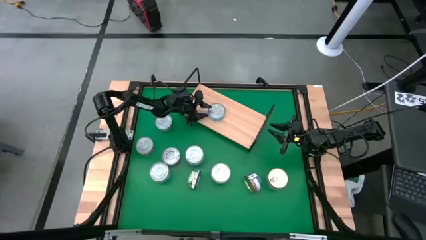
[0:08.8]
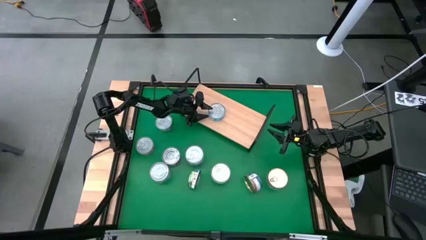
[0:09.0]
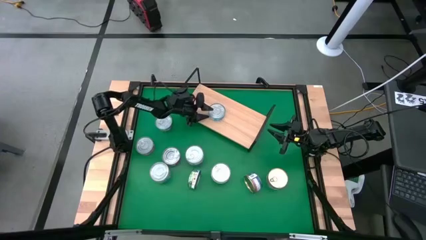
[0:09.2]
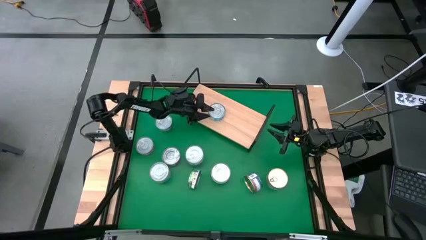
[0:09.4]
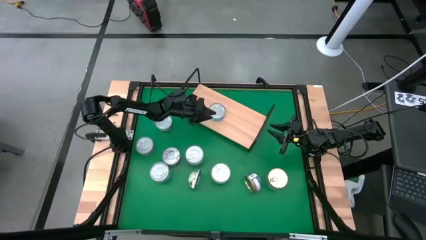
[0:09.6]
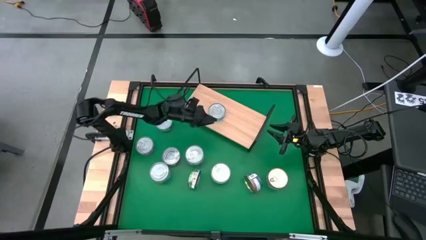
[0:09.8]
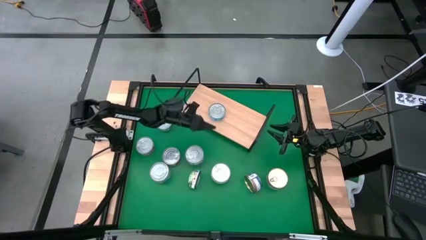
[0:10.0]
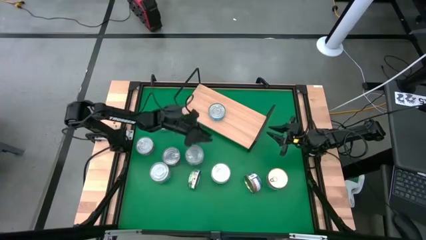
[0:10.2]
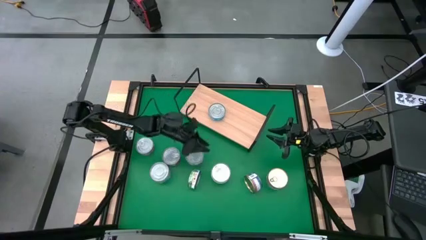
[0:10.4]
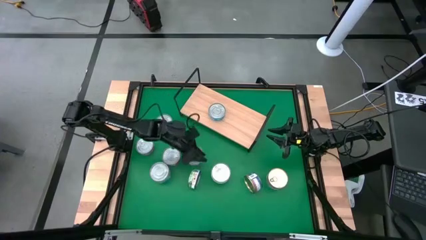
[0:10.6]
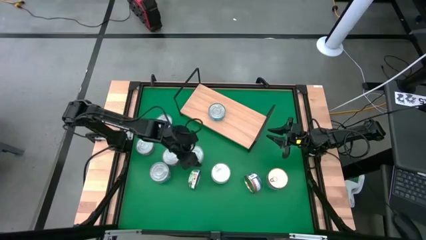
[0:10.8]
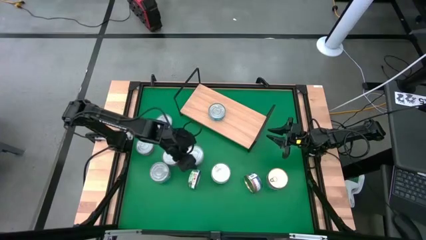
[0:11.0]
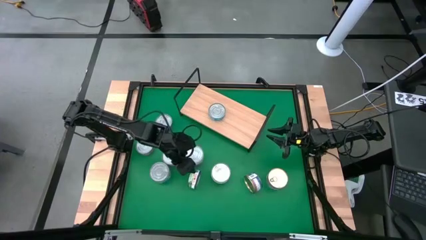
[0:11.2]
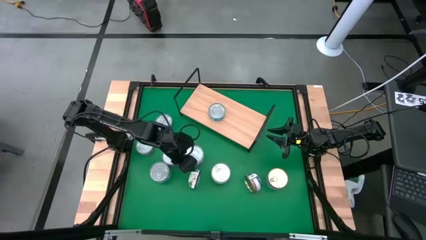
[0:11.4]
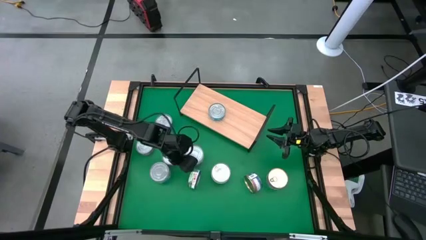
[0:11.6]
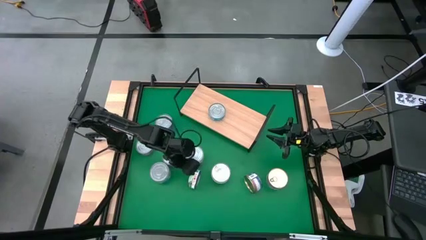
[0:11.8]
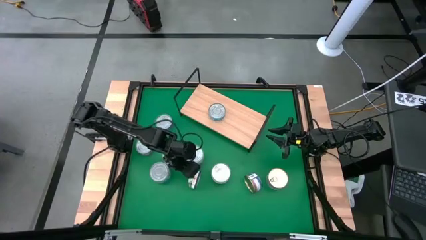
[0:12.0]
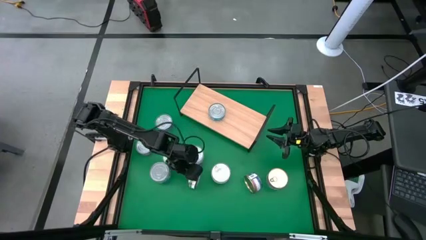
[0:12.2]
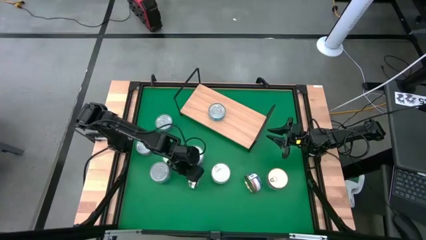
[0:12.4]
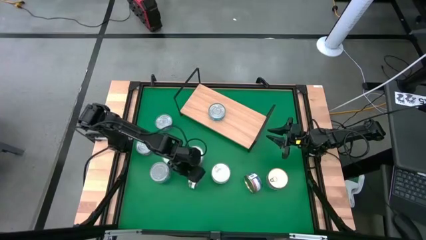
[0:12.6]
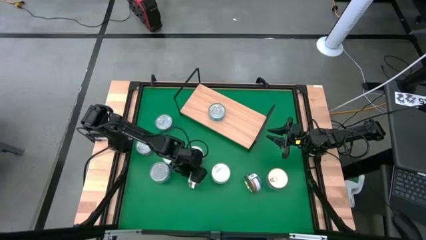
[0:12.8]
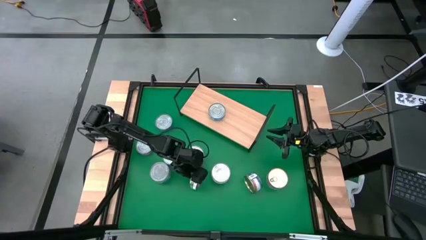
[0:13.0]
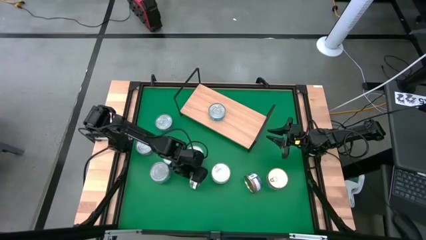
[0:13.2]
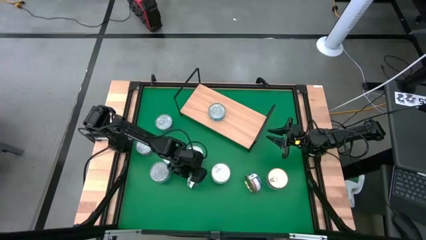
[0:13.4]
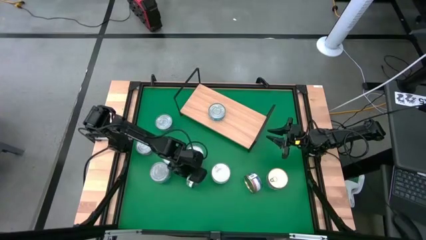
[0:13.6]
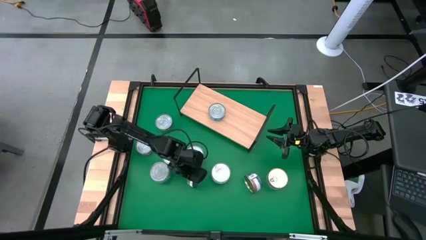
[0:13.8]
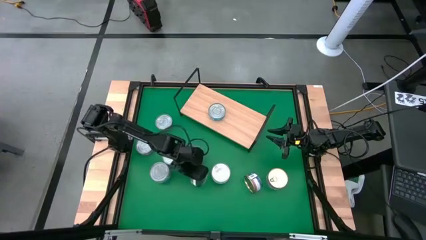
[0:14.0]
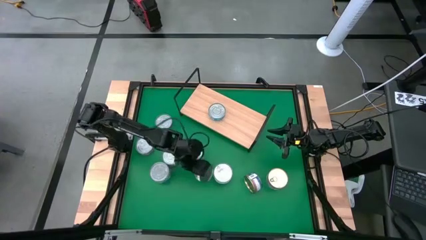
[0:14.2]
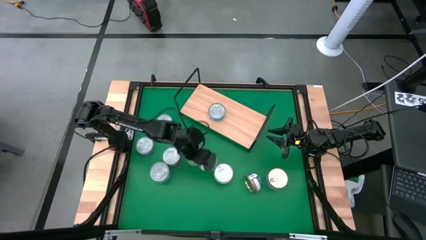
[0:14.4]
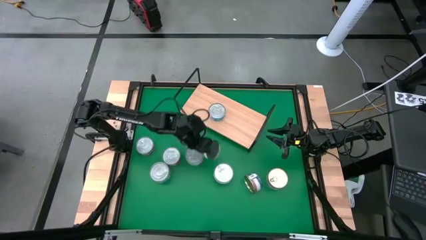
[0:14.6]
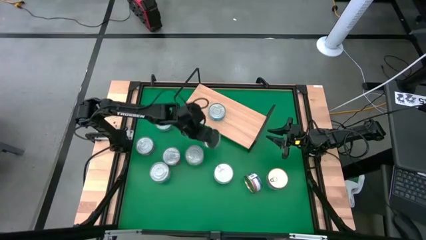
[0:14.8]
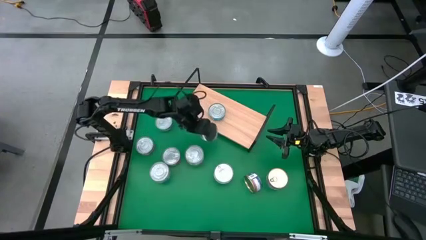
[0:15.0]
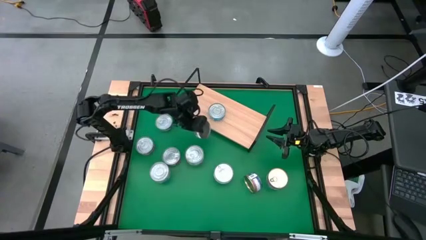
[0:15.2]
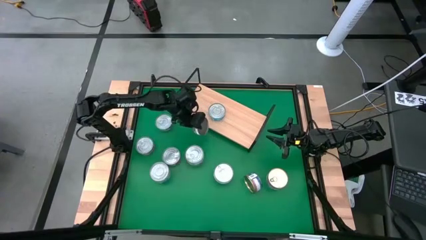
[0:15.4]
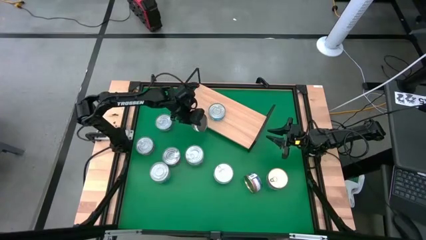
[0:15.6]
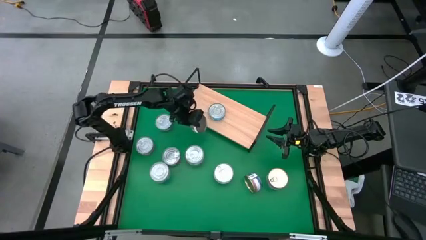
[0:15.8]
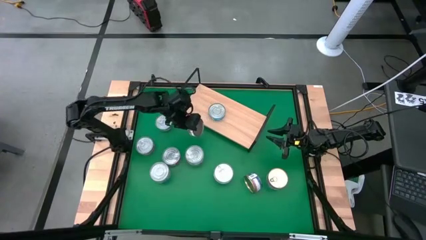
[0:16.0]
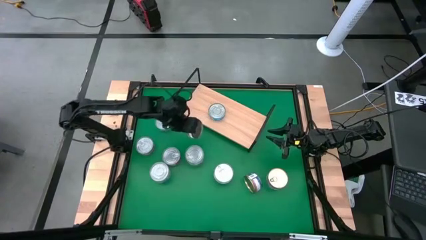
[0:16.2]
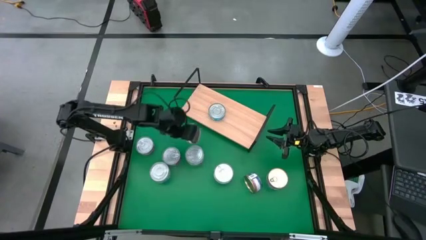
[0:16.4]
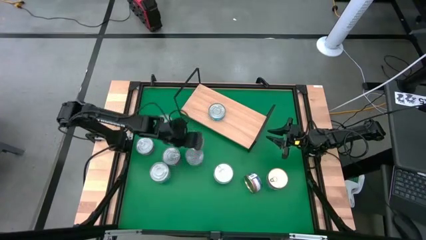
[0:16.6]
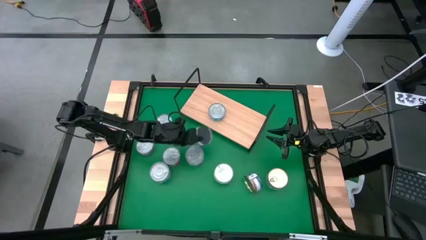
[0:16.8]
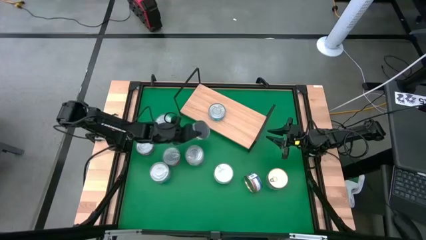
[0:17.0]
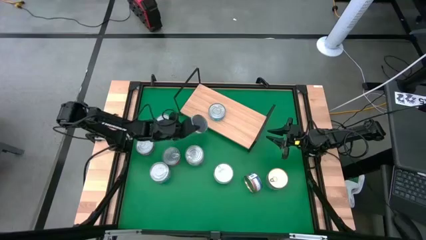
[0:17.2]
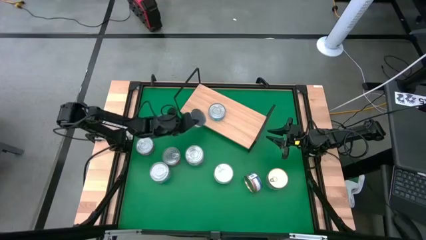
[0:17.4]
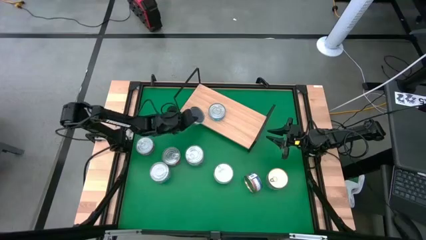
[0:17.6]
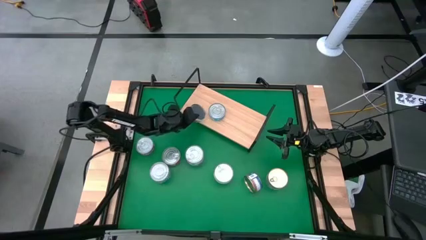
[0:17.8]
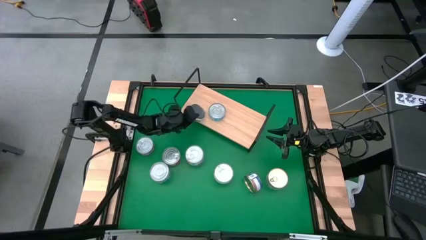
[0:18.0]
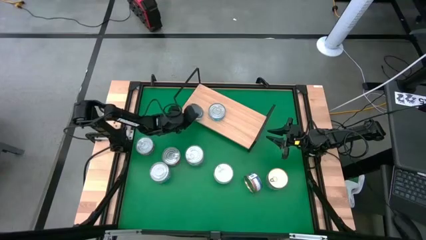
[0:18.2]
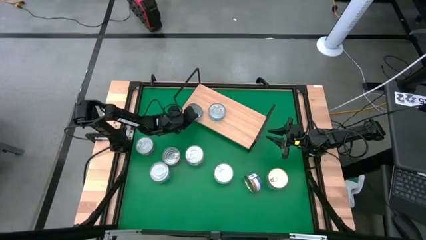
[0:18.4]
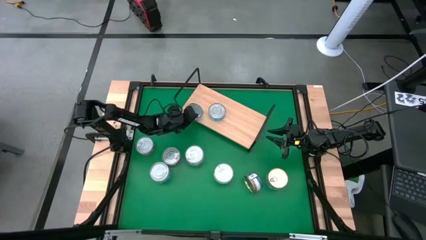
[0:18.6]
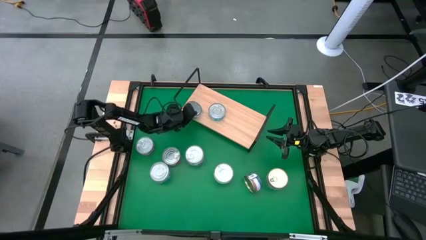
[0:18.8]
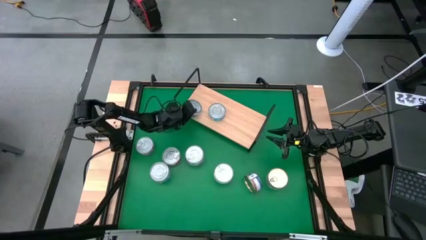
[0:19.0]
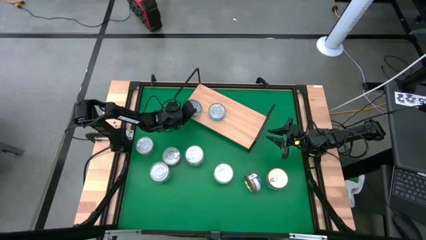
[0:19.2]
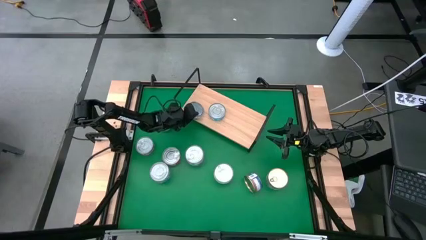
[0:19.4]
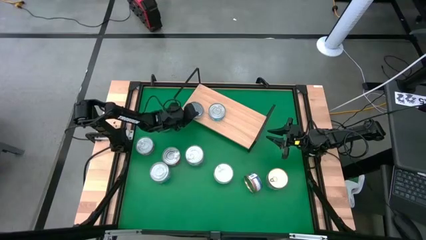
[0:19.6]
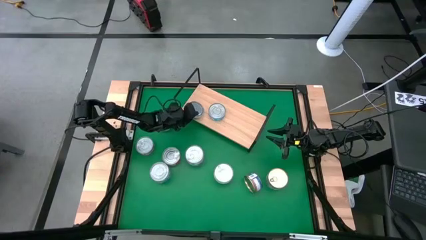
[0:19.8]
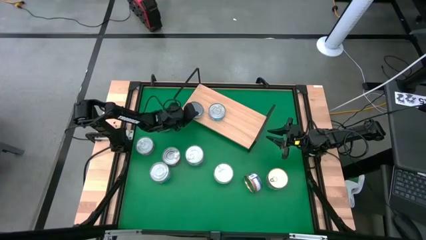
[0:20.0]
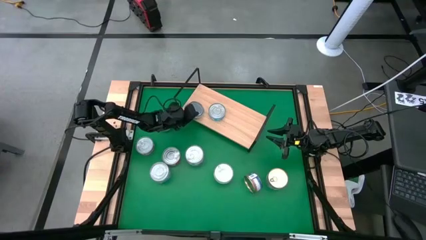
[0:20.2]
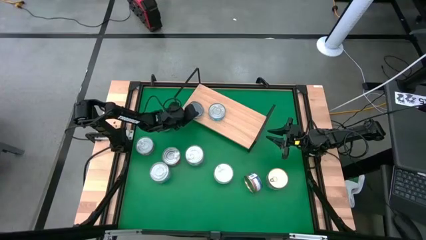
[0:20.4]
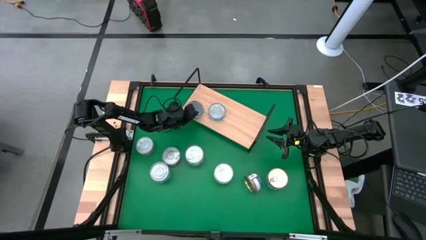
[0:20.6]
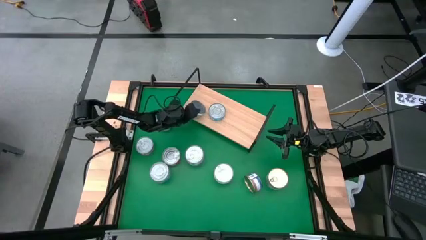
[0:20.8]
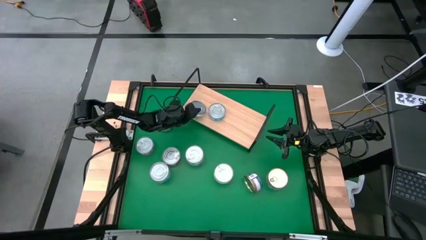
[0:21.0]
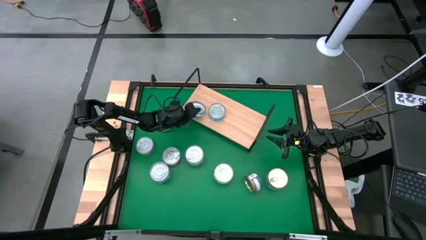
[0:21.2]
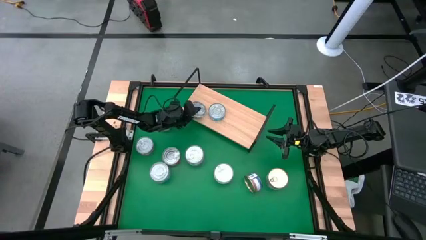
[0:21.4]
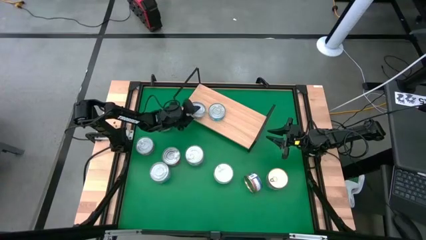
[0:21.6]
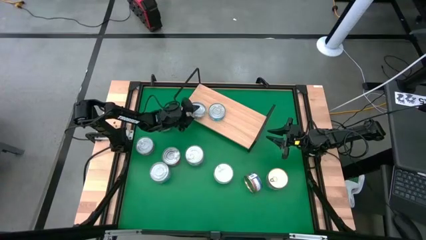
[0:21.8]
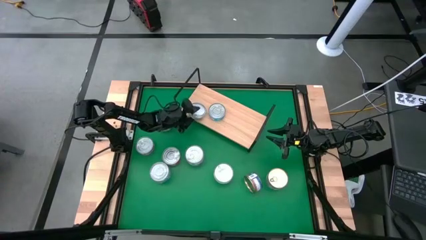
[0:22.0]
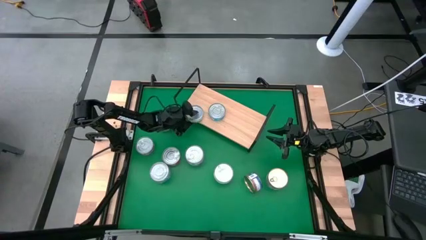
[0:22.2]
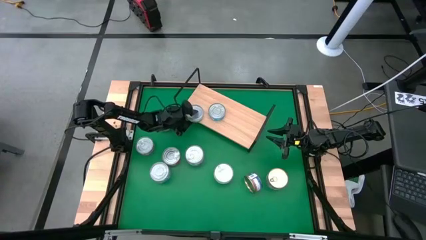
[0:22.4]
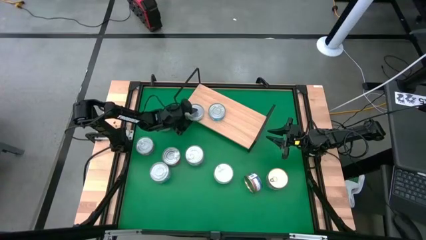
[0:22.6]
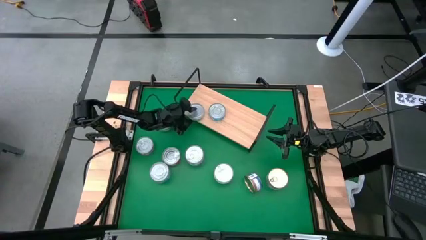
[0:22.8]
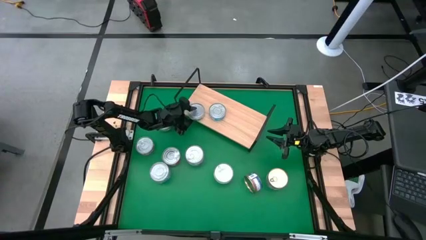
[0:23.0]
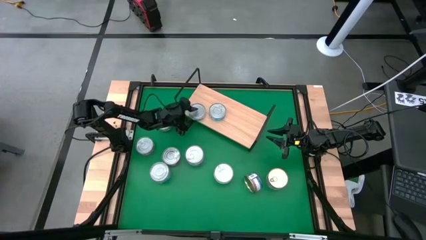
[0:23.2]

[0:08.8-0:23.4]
Task: Stack canned seafood by type on shelf
Put the light green tuna can on the shelf
